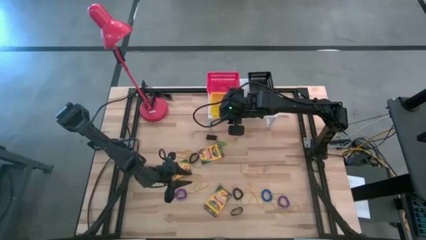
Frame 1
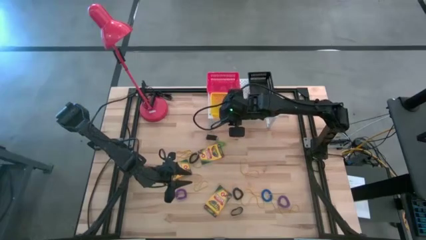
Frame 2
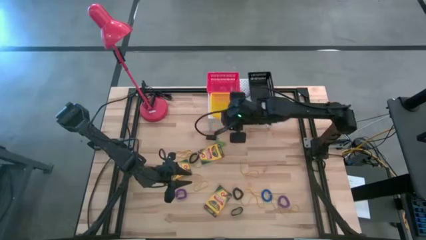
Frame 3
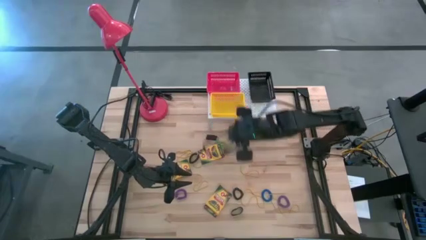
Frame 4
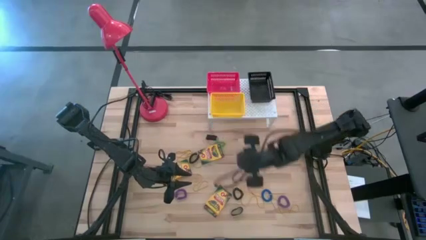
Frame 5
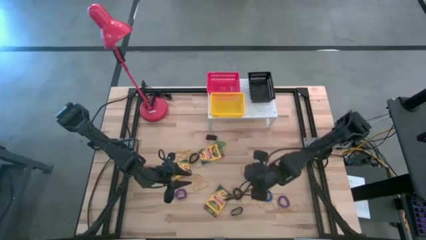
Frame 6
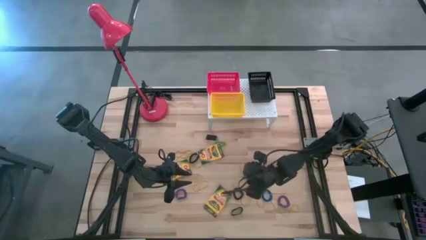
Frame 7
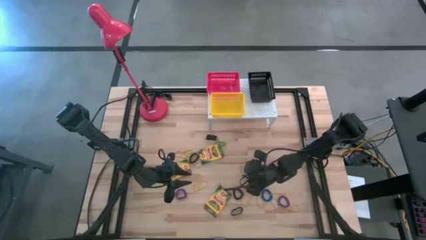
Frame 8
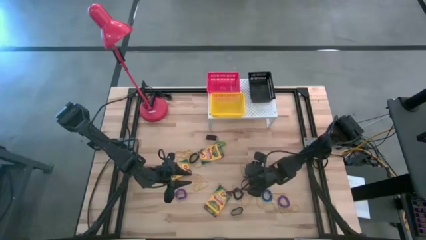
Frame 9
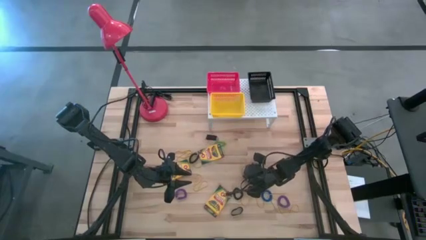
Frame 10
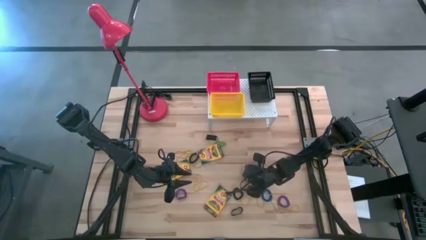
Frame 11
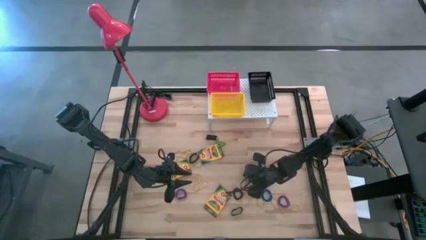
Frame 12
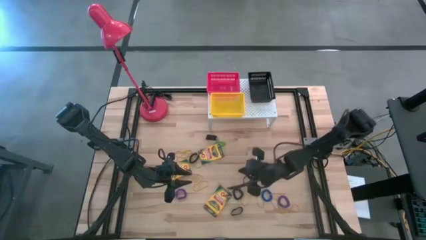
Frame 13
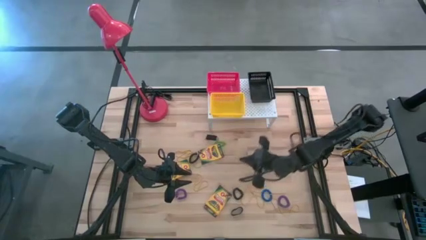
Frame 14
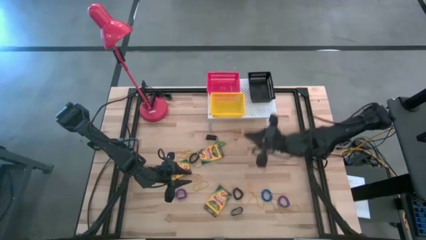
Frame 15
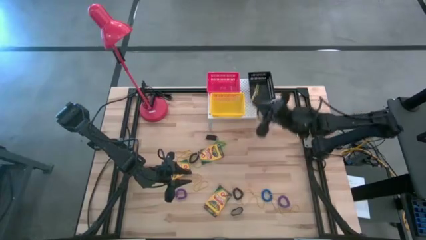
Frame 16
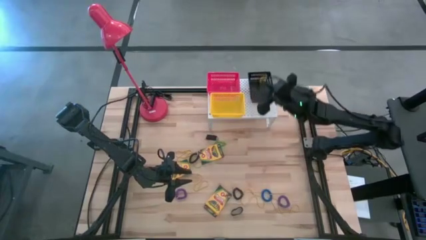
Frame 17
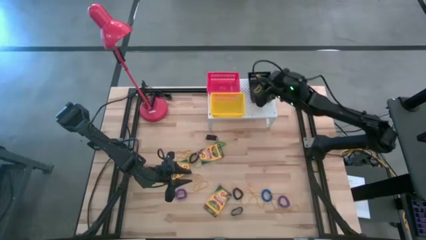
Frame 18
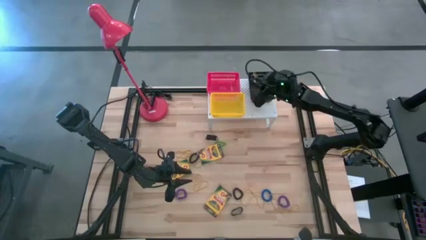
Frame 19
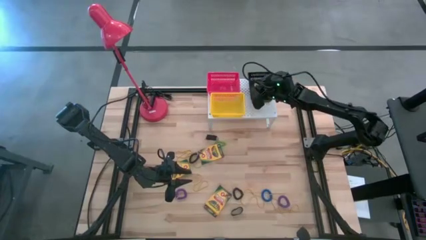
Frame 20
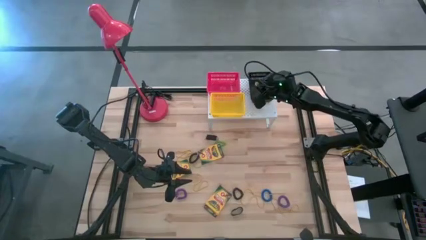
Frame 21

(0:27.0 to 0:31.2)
Task: Pick & Place Office Desk Supplies
Put the yellow rubber band into the black bin on the shelf

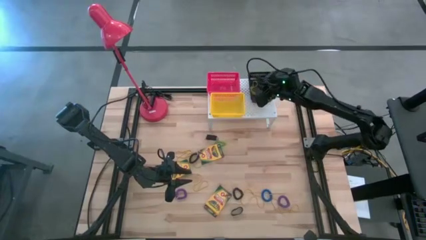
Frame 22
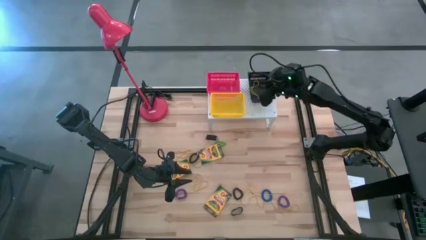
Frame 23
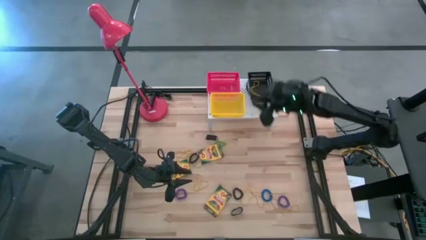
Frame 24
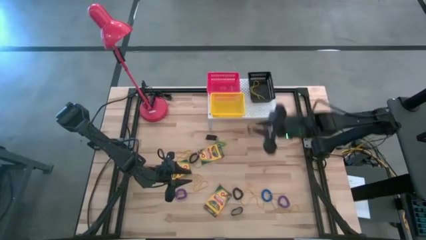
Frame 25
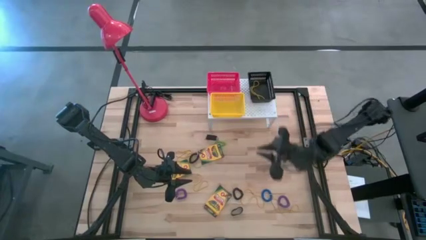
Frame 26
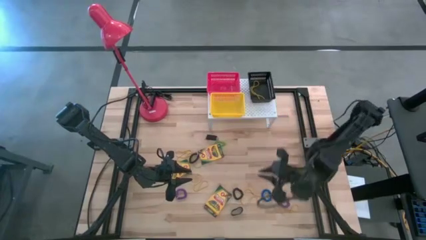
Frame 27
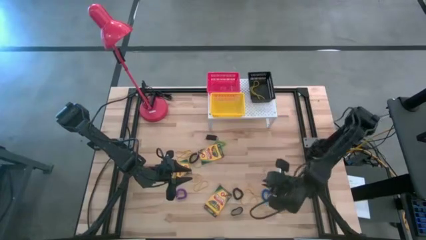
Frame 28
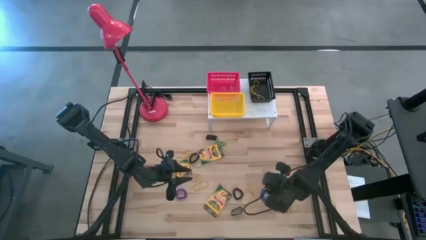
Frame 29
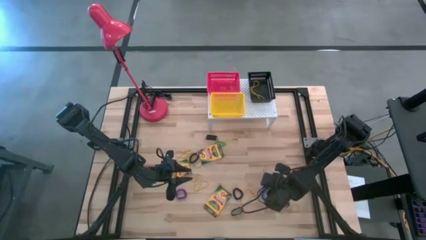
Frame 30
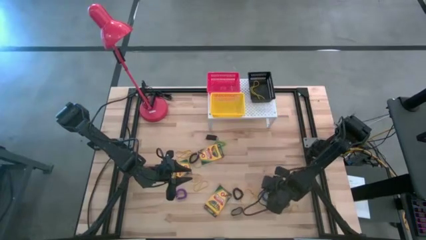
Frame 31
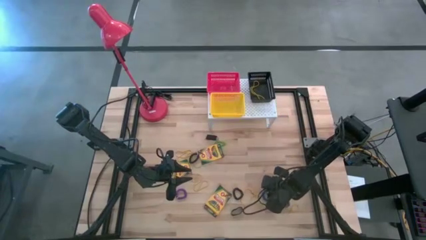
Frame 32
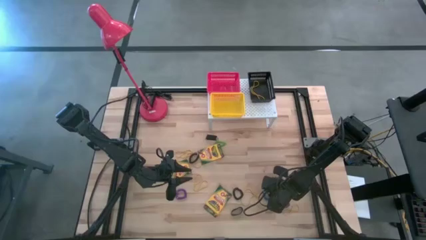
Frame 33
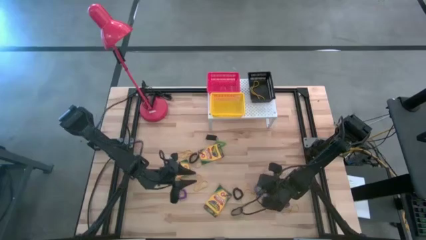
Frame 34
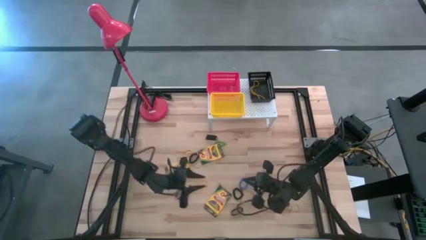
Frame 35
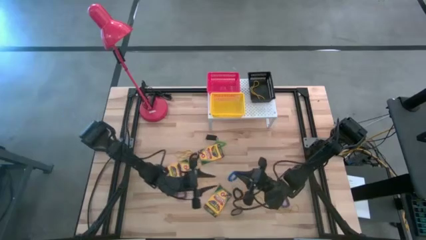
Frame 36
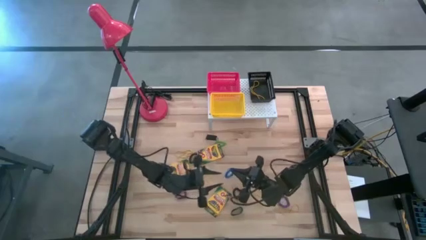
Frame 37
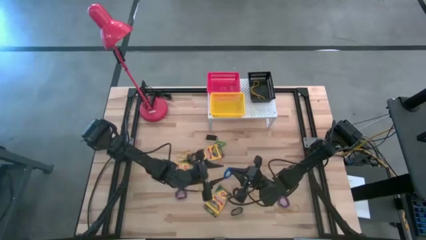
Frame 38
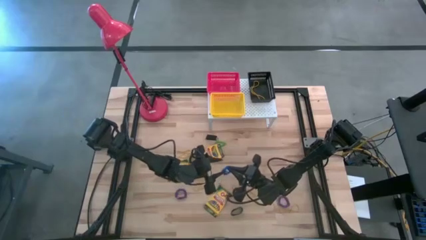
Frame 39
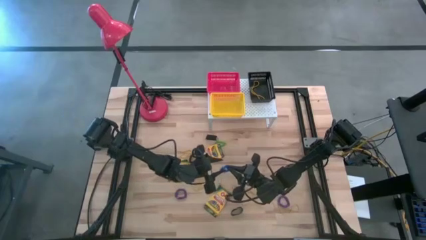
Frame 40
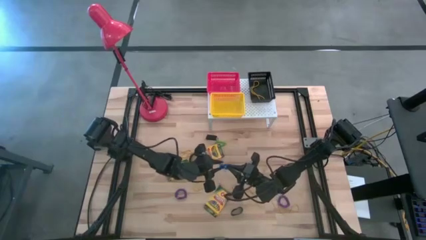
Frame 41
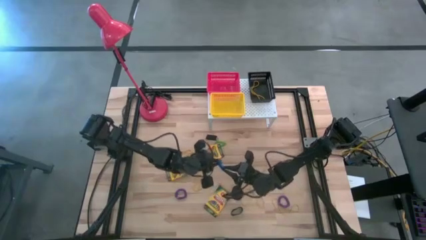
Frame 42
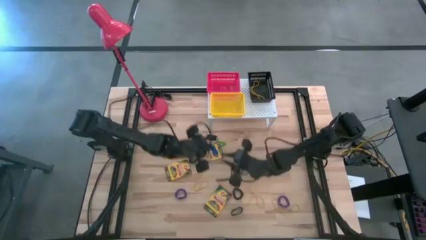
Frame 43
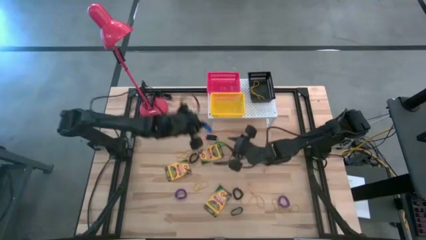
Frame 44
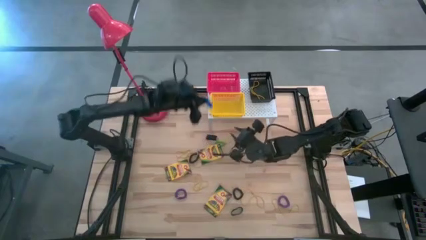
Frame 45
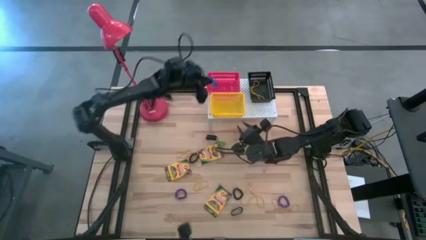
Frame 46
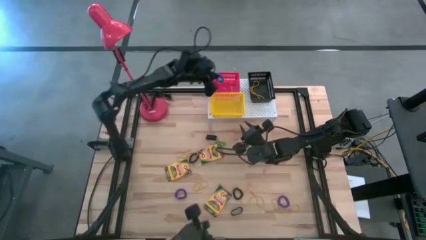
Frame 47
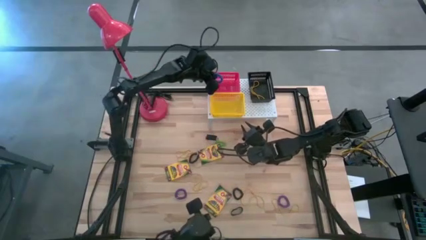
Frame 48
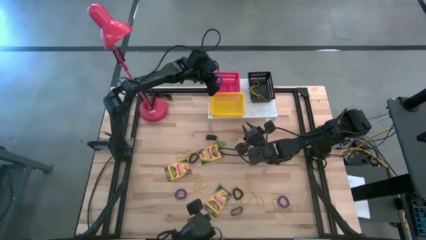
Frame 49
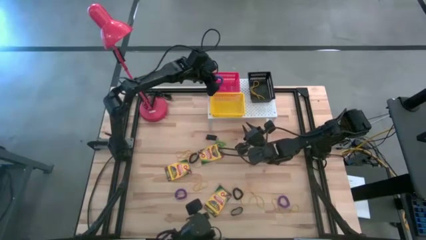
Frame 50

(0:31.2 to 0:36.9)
Put the blue spring keychain into the red bin on the shelf

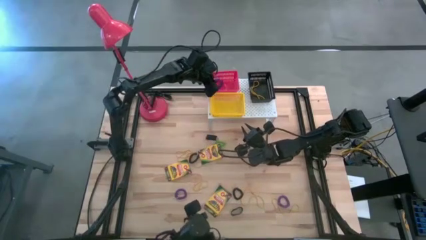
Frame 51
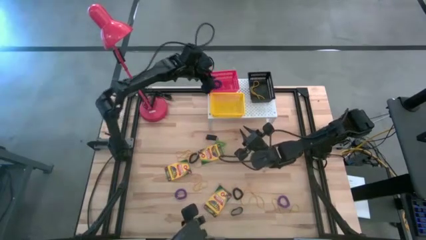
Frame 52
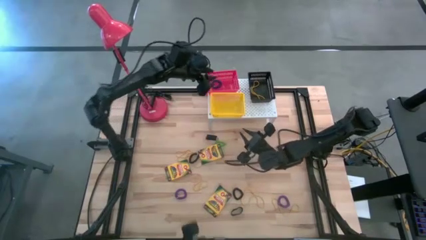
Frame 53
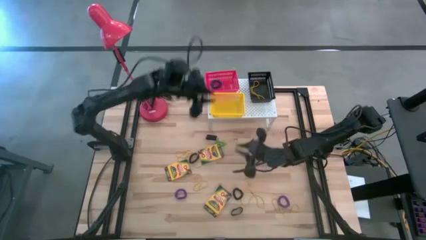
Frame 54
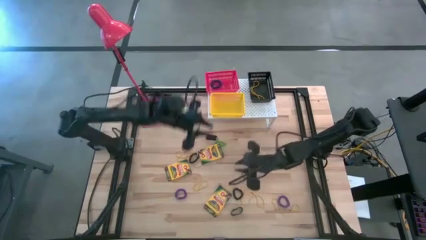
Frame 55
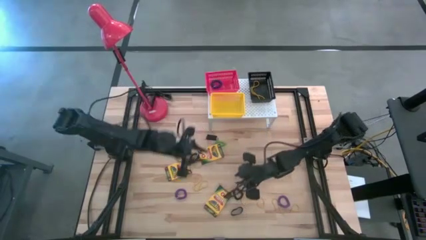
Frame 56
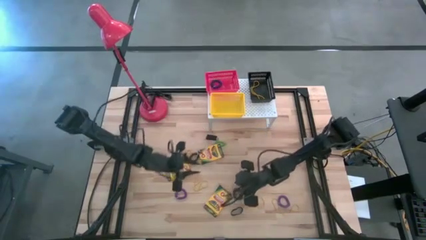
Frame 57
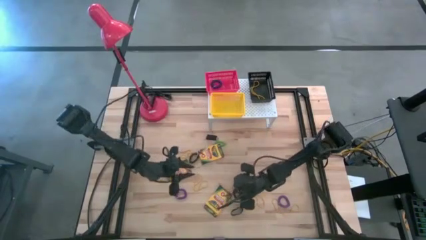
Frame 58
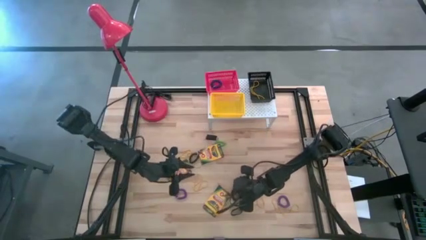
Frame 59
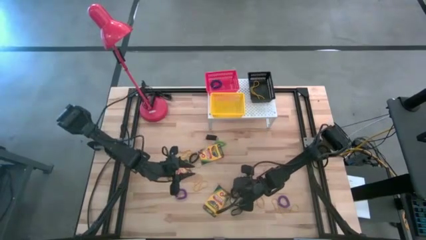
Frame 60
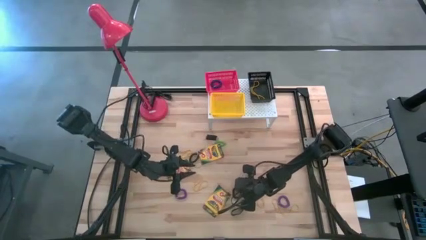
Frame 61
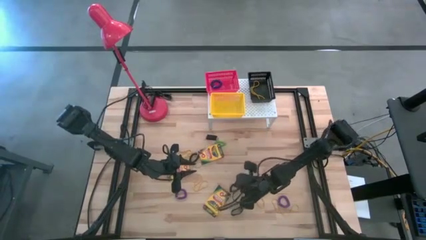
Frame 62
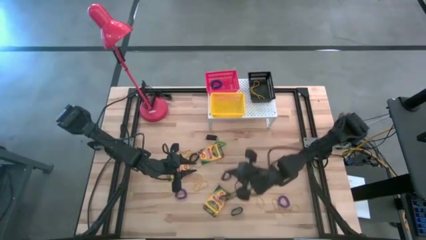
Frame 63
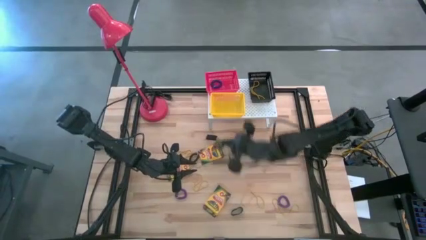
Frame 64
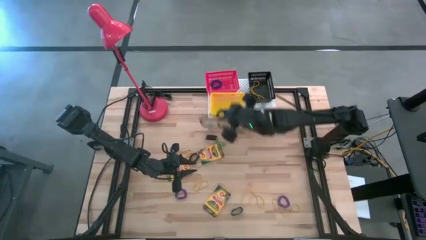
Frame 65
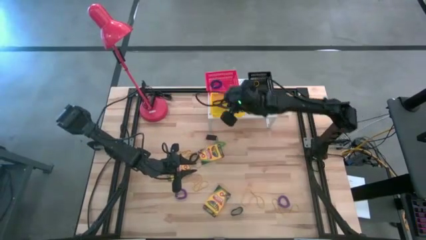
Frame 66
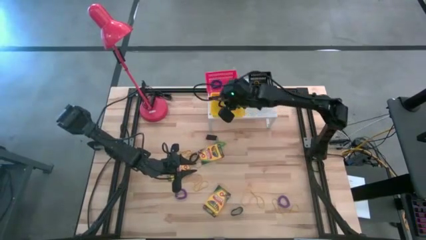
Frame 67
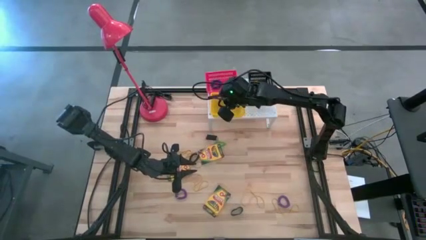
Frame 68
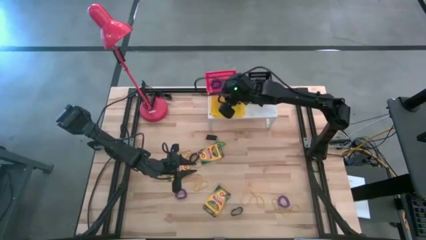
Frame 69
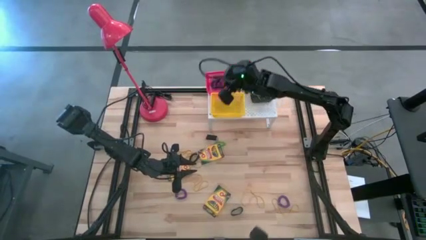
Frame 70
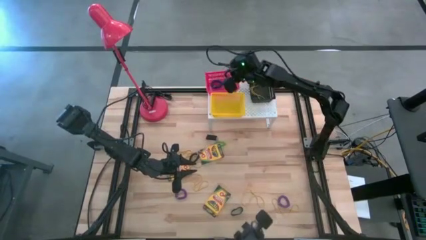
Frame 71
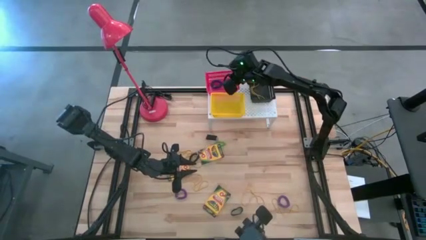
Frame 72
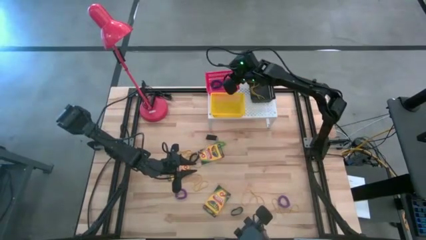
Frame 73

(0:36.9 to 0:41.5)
Put the black spring keychain into the red bin on the shelf

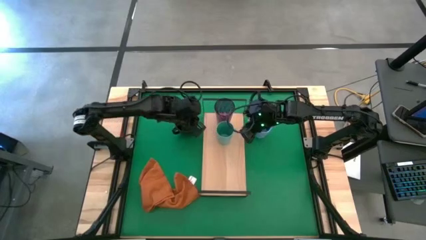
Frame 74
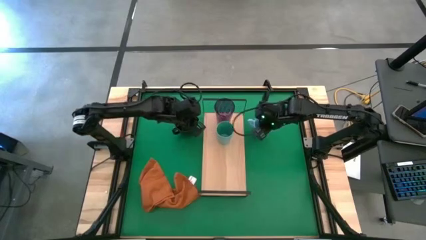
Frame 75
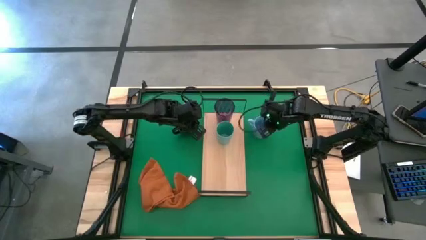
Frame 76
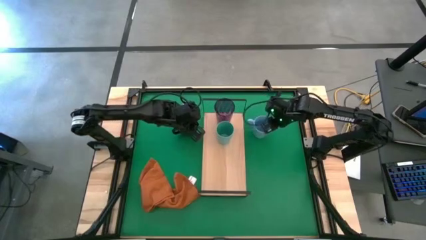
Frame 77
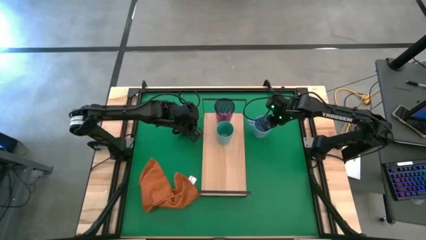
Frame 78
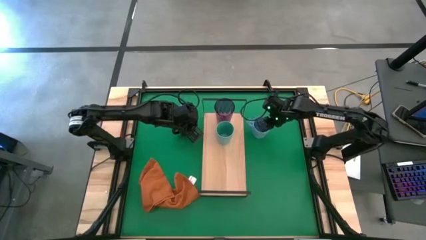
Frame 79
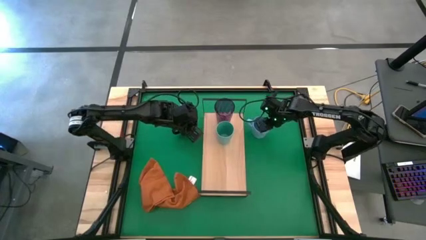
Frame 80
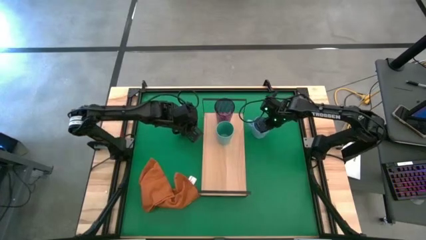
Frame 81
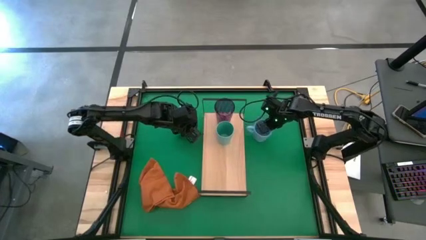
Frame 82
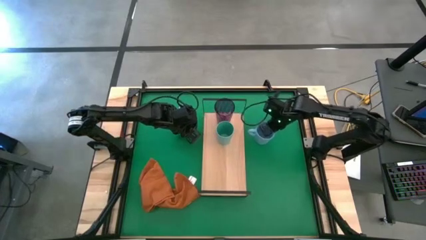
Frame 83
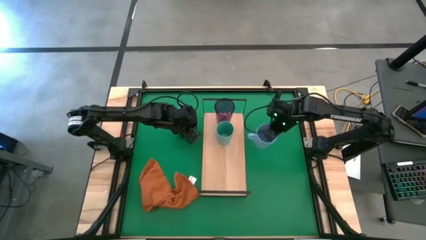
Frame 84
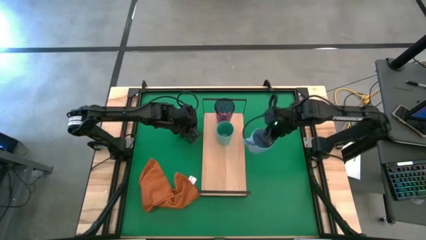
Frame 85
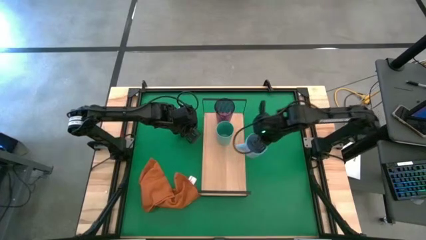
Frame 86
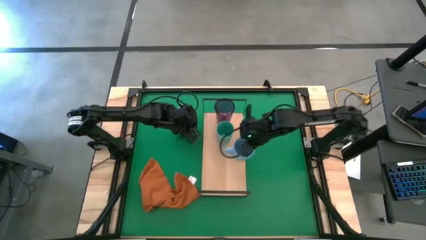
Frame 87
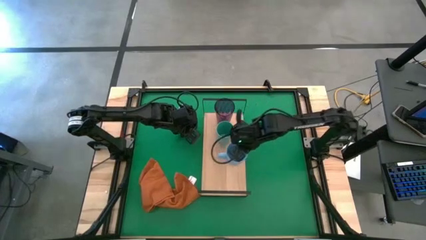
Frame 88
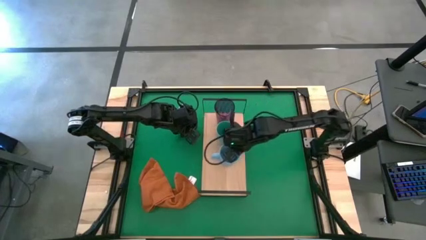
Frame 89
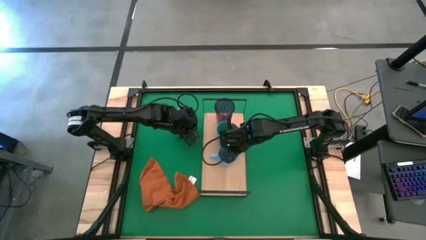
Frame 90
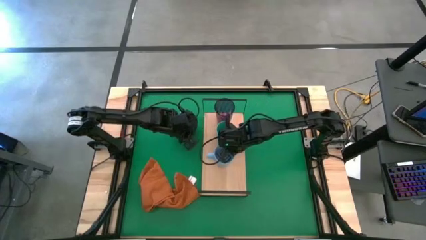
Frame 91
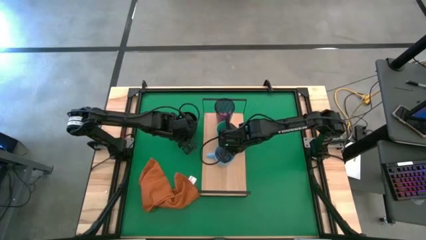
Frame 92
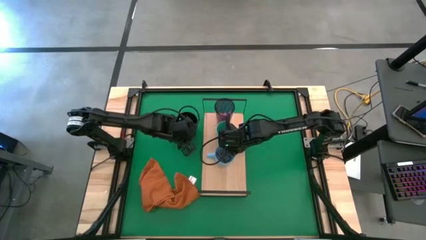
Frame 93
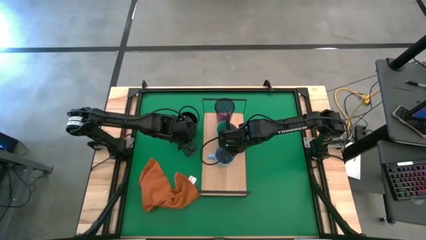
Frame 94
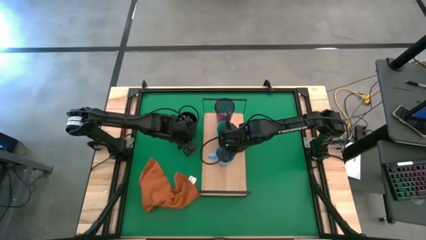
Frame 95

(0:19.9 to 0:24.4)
Task: Stack small to large cups/mugs on shelf
Put the blue mug on the shelf
